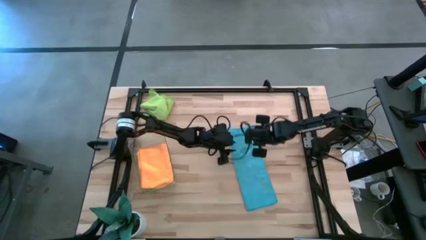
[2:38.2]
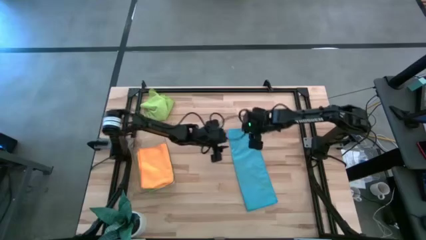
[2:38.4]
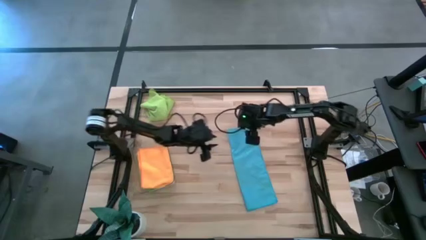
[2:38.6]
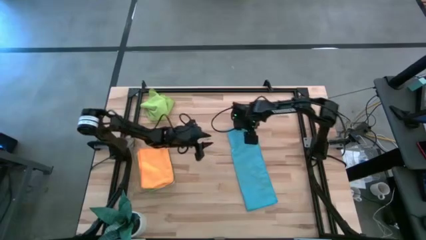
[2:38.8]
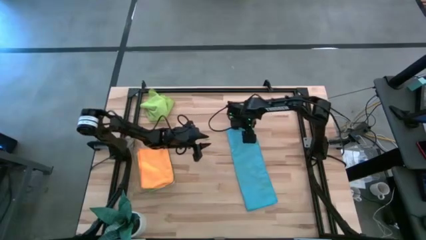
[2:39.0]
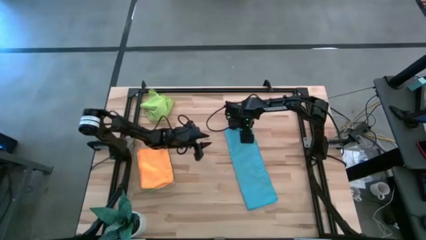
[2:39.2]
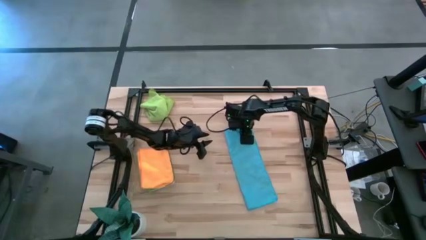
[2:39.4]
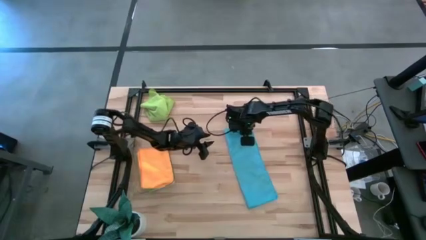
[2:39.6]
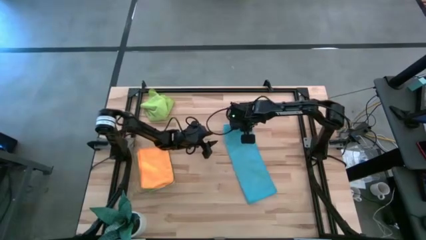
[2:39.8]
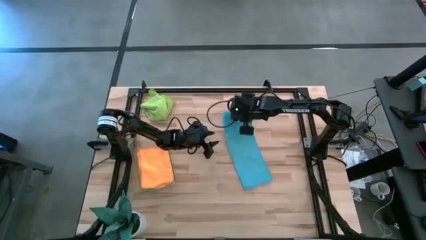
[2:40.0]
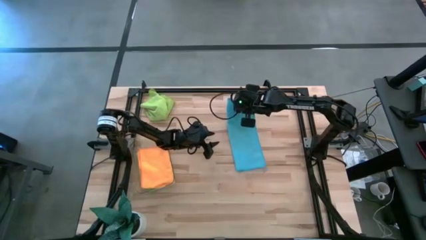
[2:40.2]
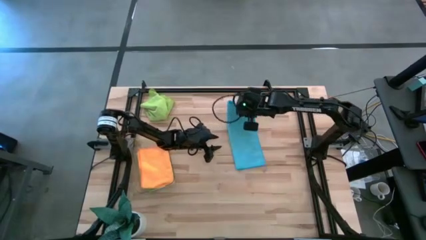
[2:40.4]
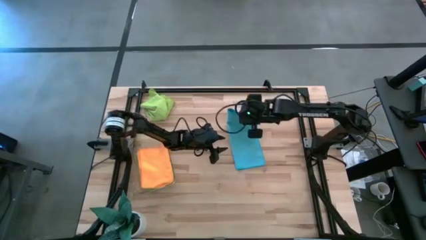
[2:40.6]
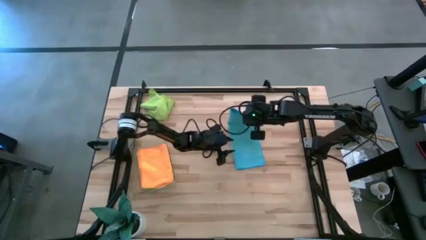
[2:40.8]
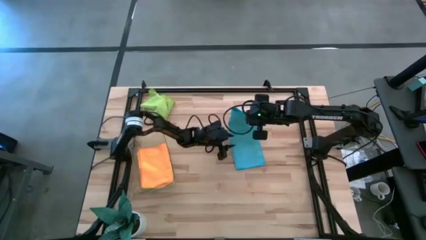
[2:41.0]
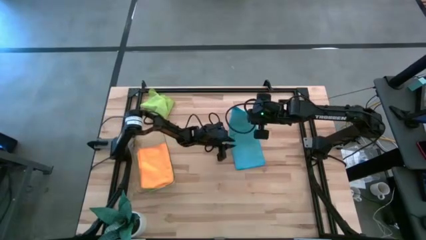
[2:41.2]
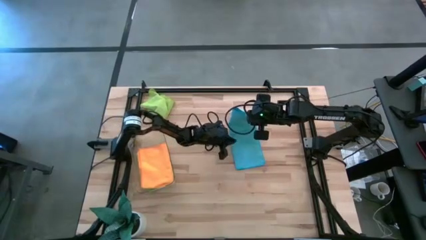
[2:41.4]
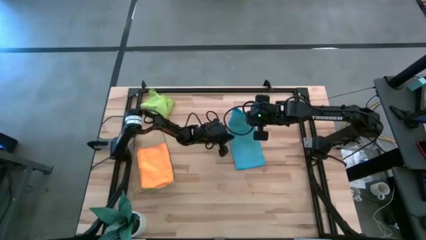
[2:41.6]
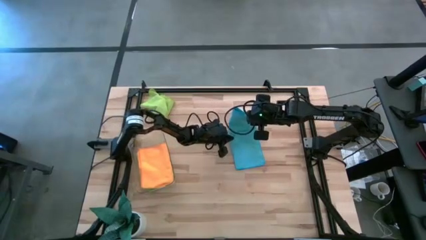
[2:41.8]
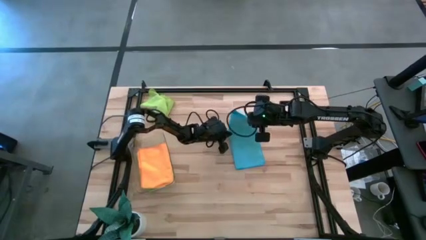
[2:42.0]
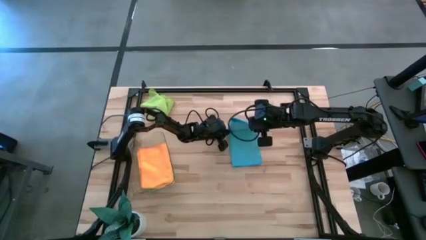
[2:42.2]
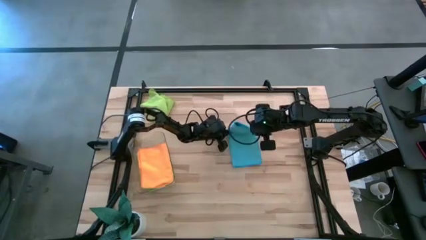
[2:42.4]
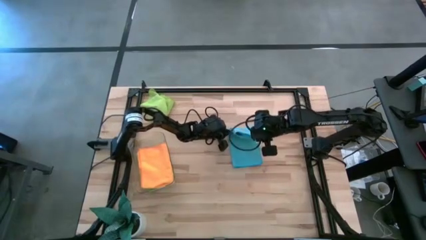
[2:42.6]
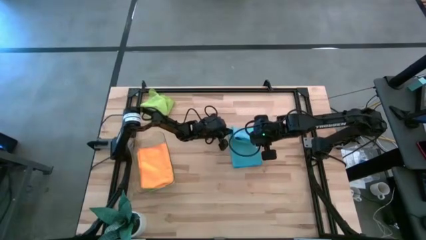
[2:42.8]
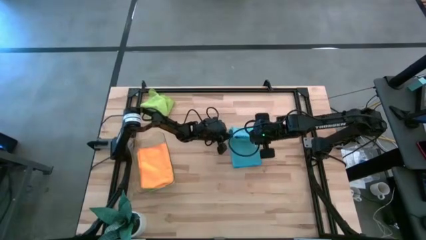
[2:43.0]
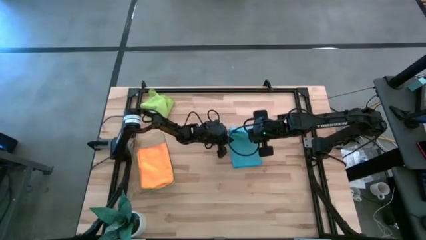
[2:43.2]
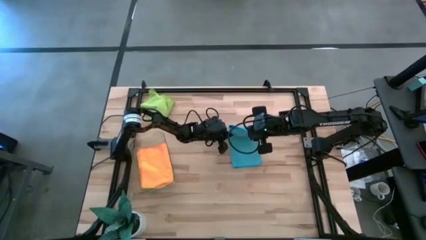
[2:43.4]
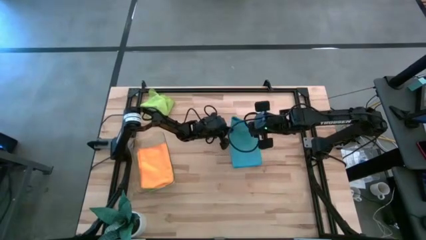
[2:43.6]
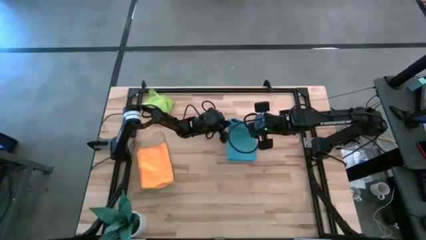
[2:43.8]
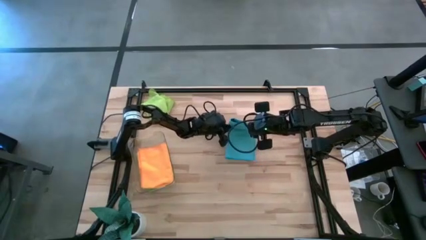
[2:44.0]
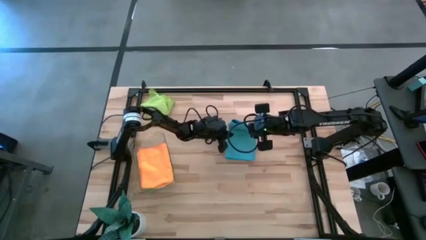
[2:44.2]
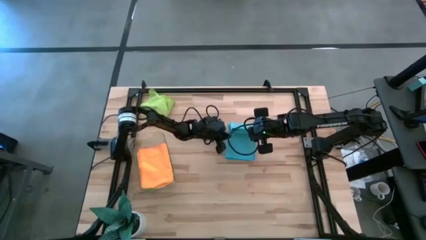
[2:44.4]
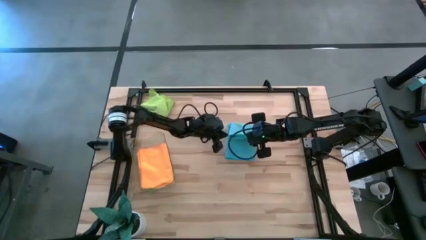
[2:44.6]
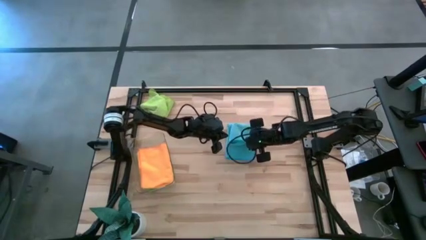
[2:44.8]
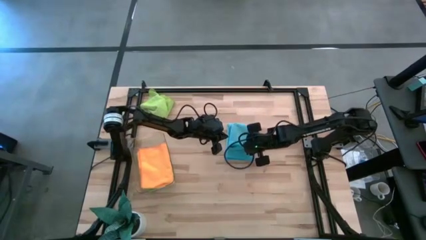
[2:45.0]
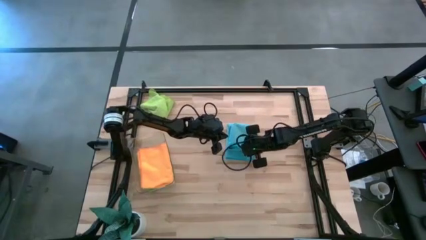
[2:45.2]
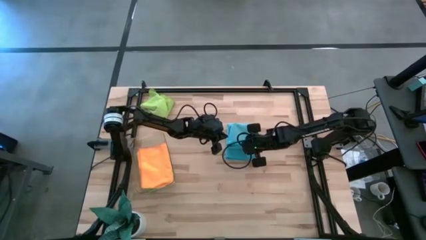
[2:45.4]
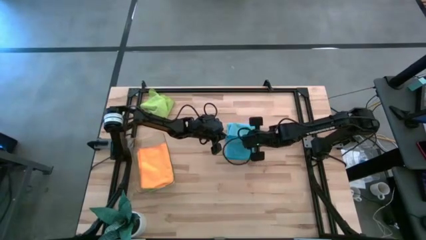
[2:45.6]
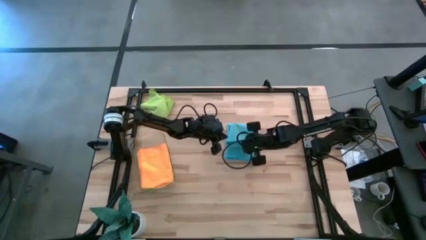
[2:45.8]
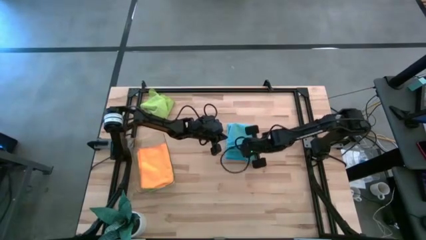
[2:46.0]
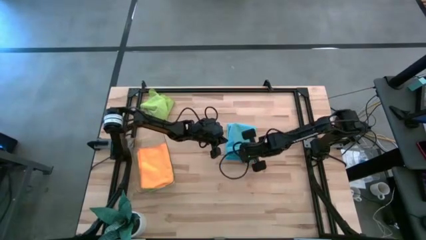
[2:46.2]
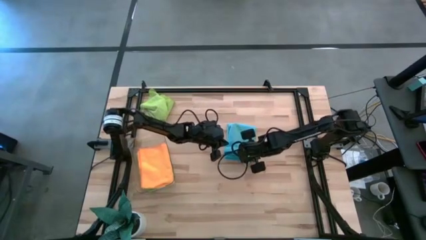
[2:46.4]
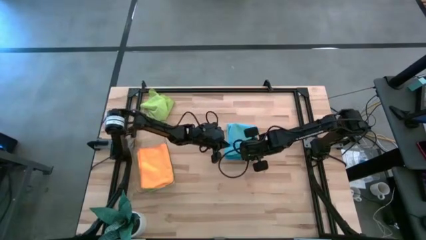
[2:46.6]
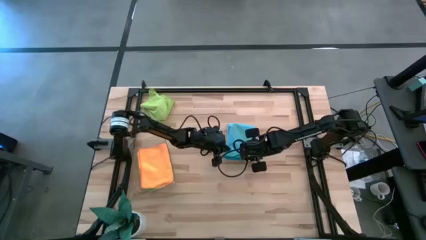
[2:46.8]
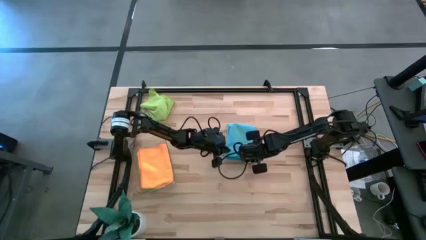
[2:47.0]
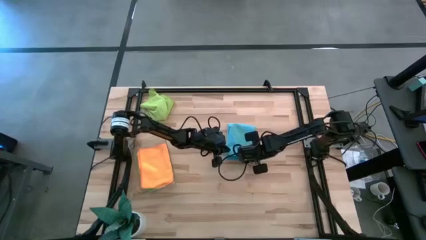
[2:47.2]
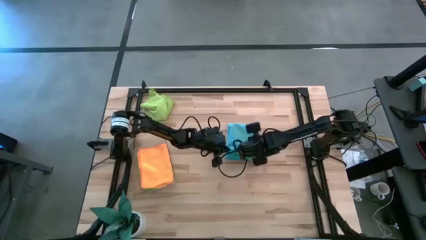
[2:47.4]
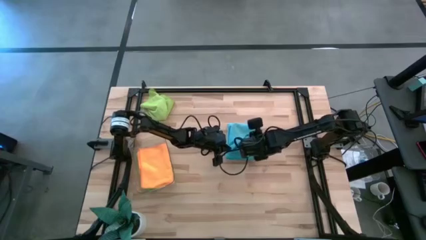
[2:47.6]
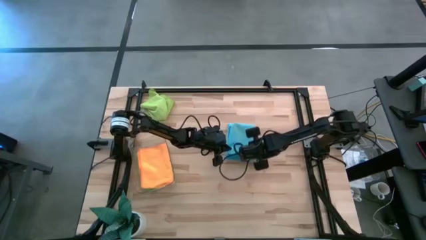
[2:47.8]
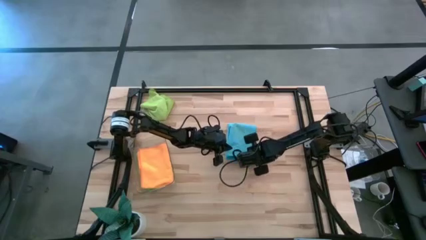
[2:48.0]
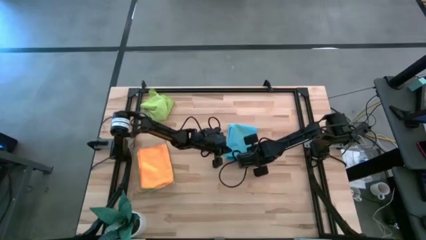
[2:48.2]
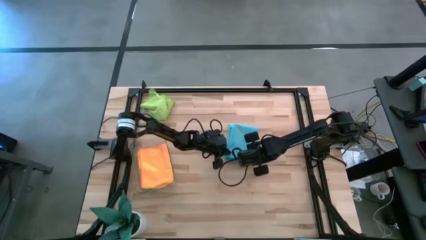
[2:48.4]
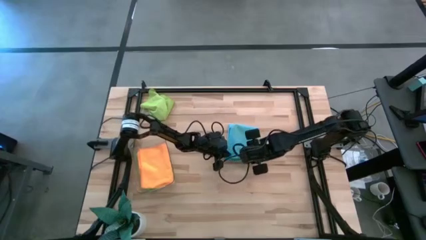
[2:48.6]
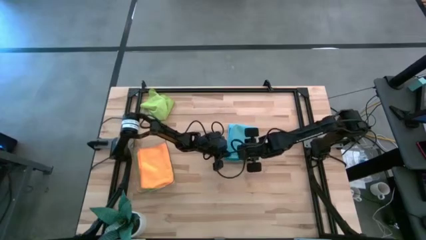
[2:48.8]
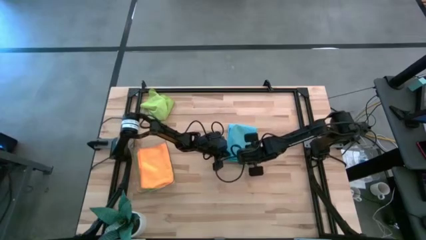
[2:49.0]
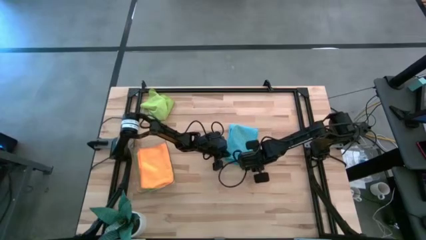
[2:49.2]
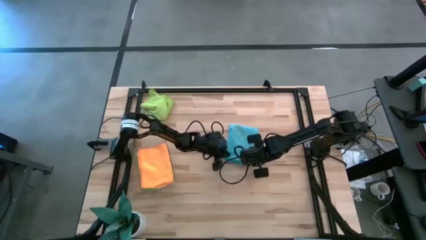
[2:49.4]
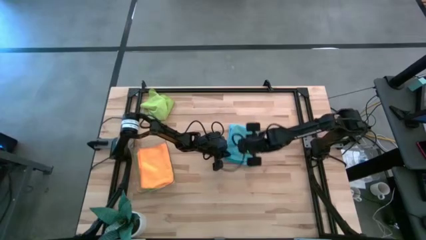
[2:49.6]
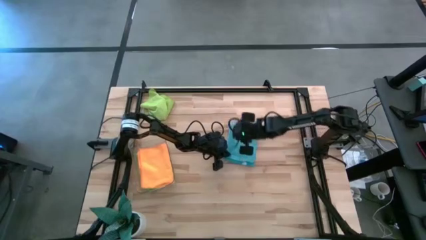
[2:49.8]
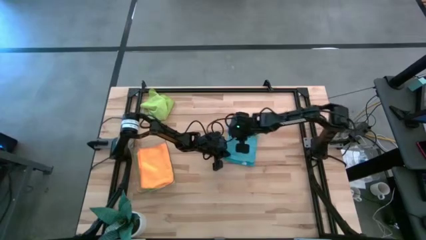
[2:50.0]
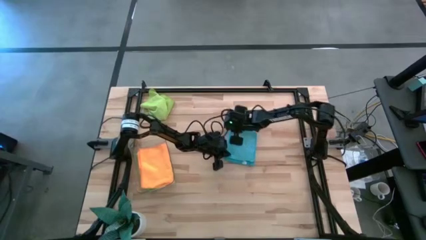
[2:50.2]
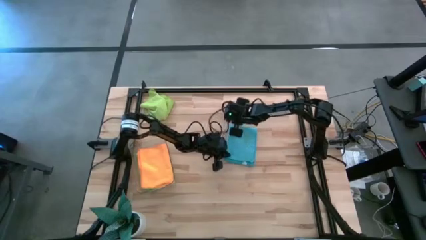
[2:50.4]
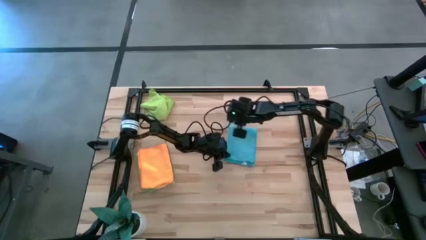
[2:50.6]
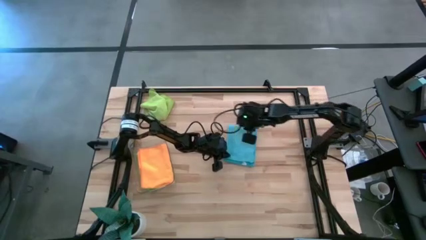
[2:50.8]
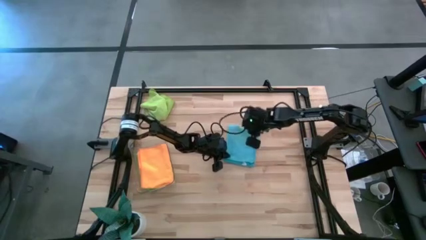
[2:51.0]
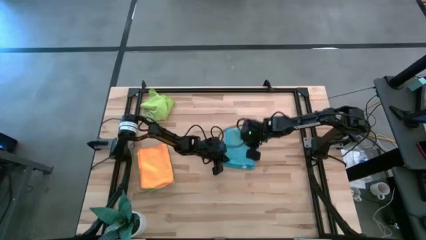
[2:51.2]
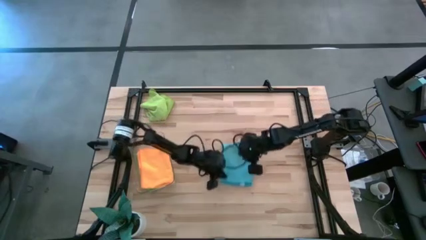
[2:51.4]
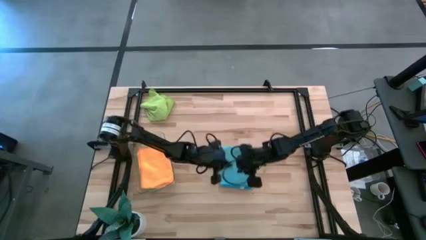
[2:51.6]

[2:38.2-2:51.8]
Task: Fold microfiber towels
Fold the blue microfiber towel on the table

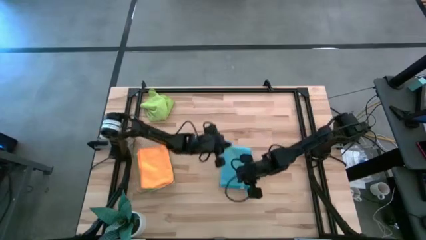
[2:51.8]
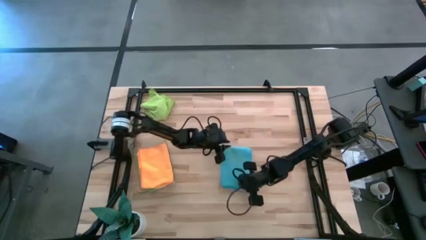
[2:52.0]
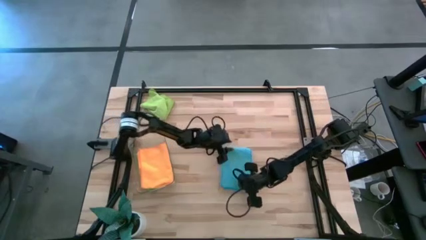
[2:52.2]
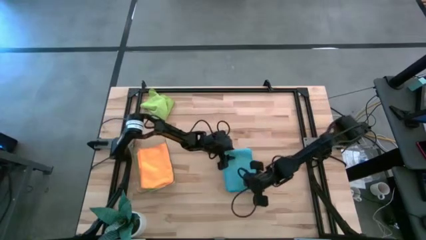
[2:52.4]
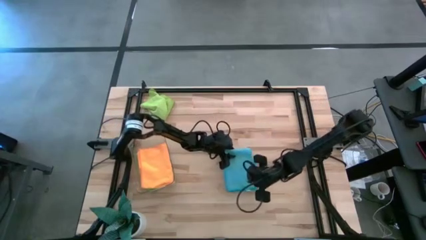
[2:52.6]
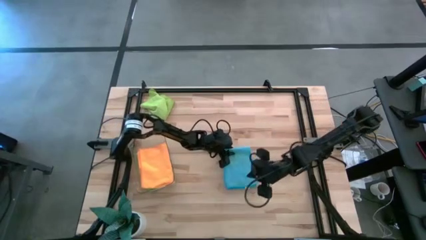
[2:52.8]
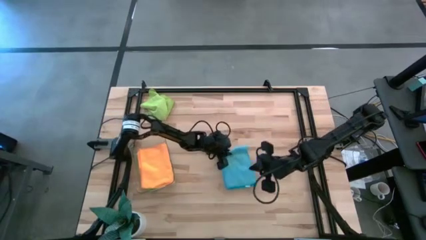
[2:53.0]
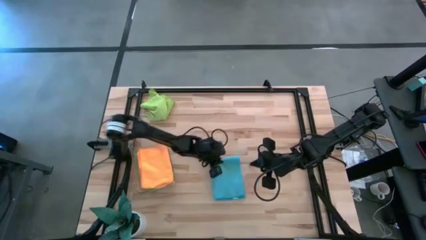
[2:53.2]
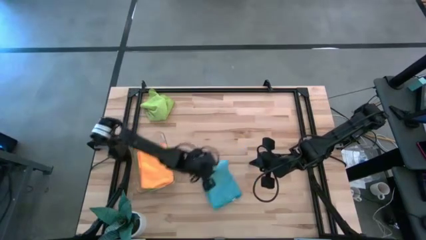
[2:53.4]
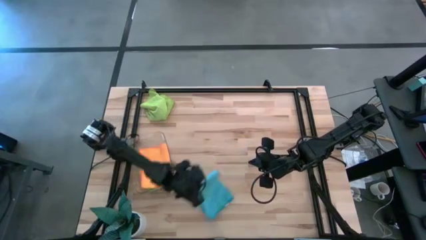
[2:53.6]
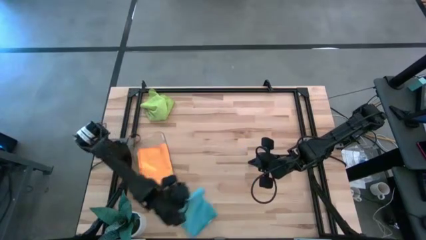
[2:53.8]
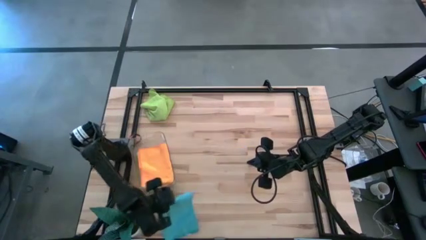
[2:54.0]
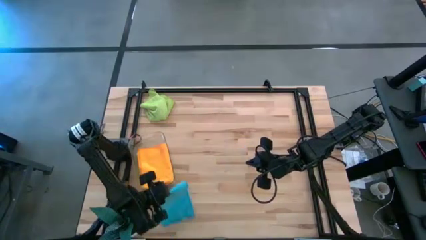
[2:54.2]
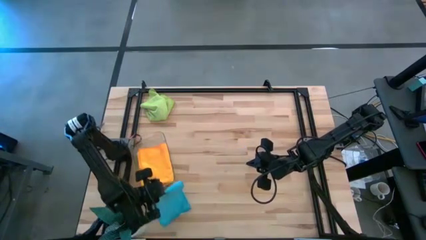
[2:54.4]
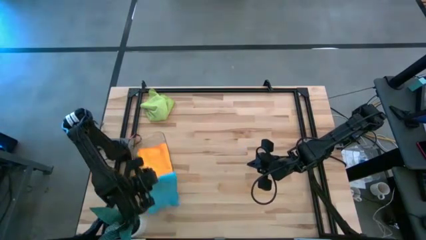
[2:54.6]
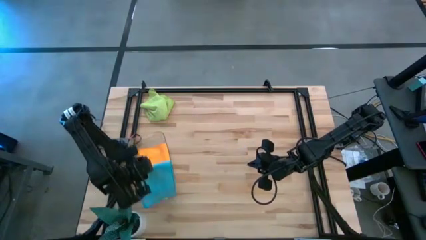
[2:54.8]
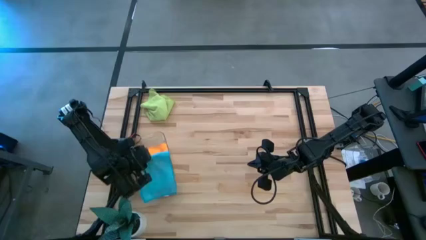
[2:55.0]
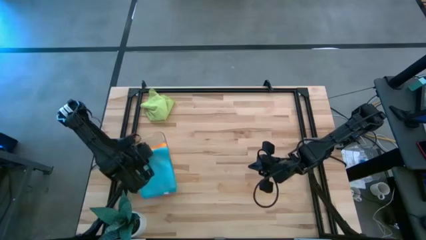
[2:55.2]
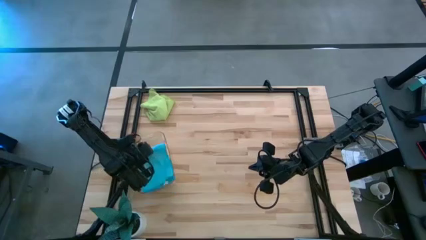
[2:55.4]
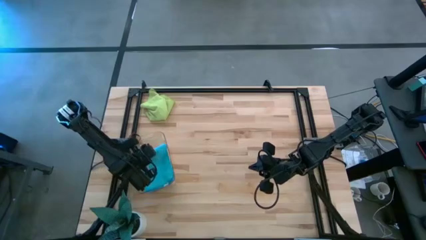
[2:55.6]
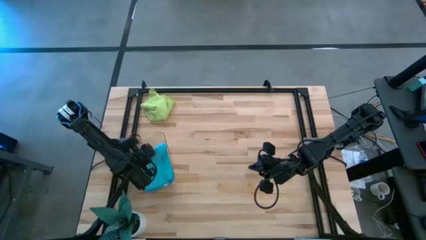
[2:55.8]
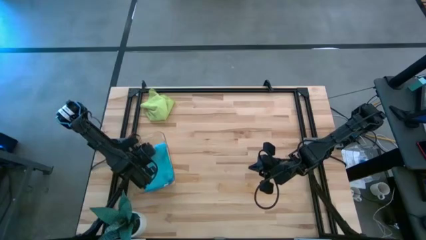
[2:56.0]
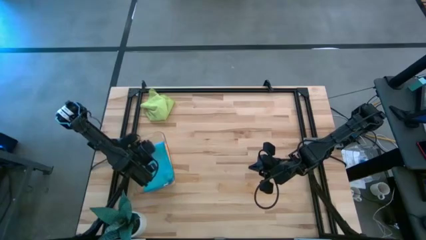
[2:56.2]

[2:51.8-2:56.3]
Put the folded blue microfiber towel into the transparent bin
